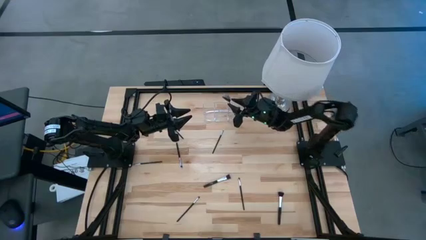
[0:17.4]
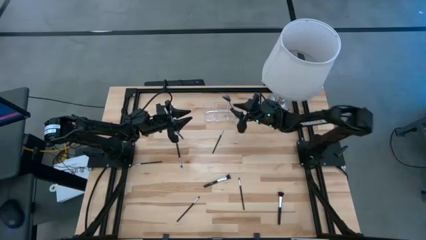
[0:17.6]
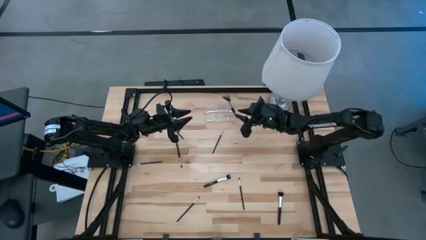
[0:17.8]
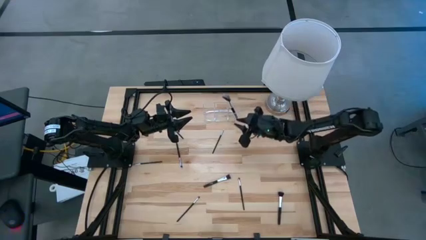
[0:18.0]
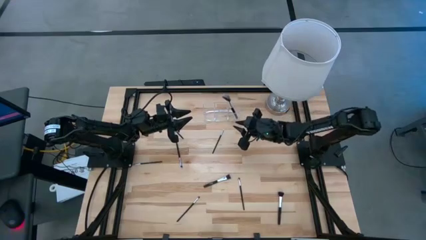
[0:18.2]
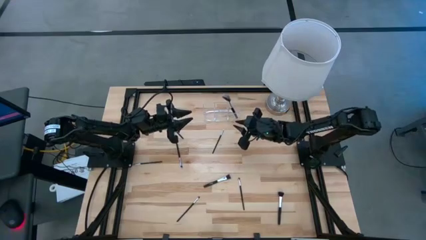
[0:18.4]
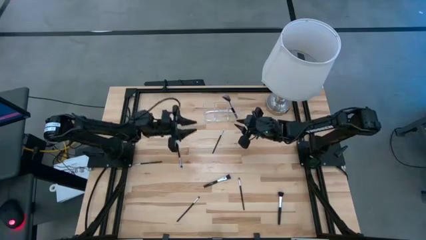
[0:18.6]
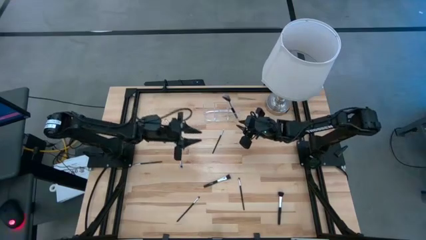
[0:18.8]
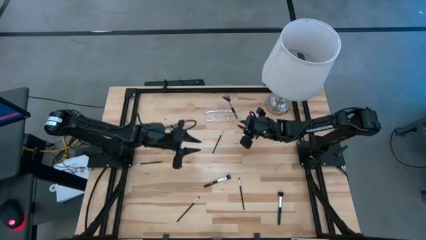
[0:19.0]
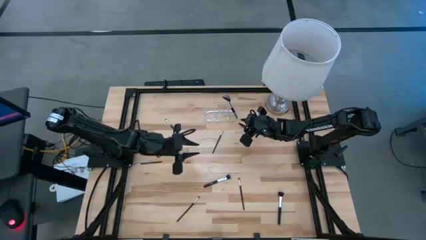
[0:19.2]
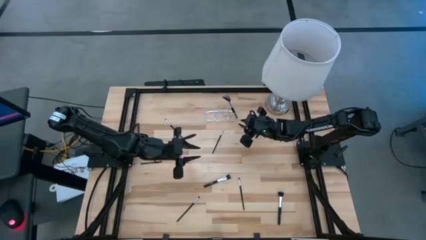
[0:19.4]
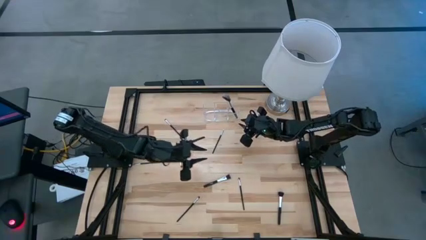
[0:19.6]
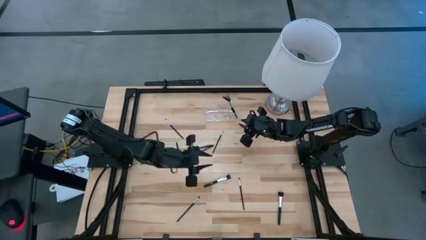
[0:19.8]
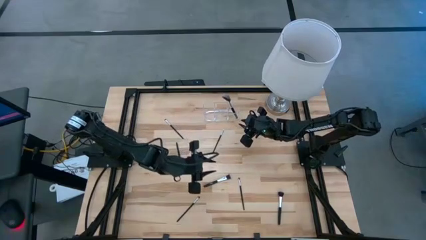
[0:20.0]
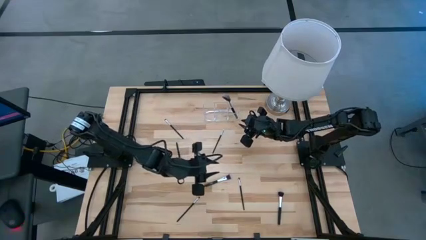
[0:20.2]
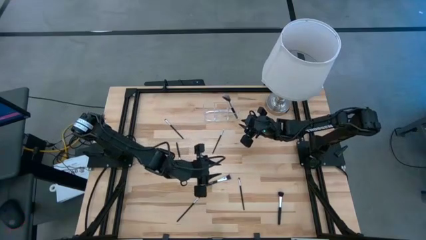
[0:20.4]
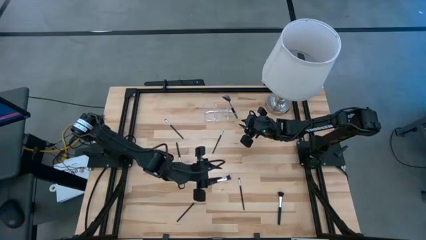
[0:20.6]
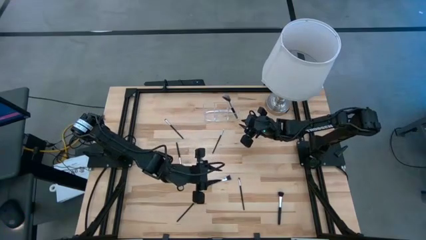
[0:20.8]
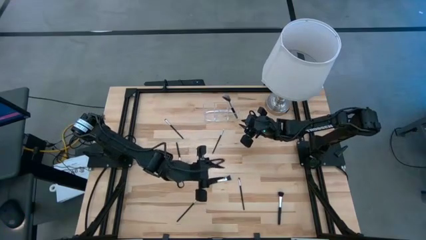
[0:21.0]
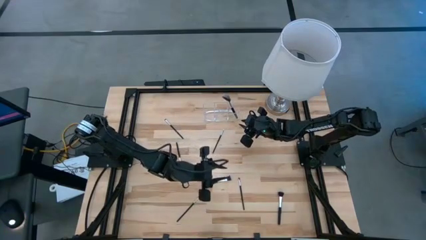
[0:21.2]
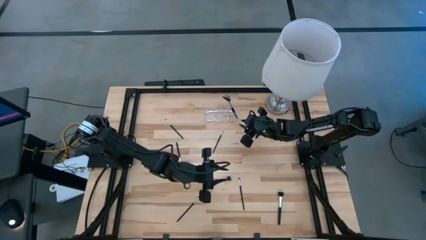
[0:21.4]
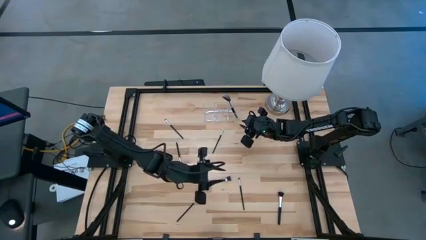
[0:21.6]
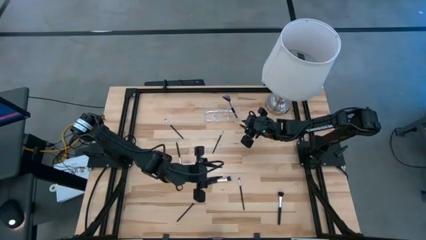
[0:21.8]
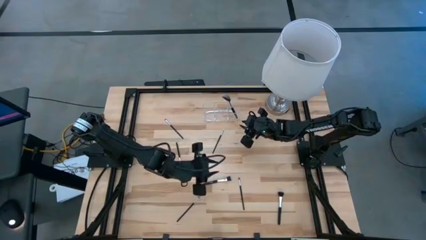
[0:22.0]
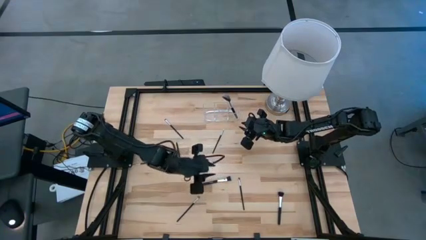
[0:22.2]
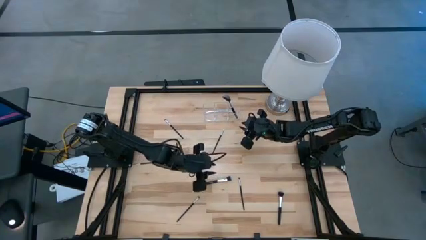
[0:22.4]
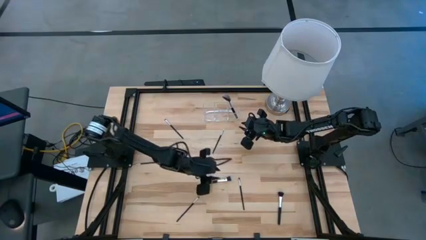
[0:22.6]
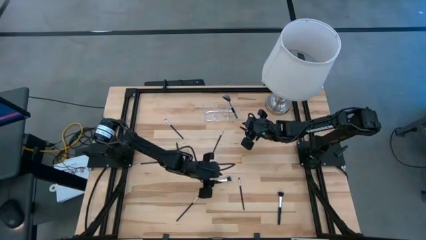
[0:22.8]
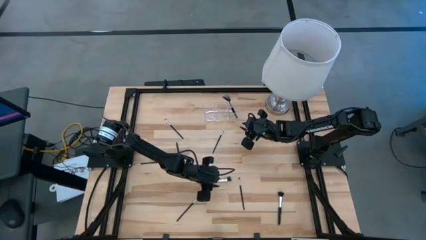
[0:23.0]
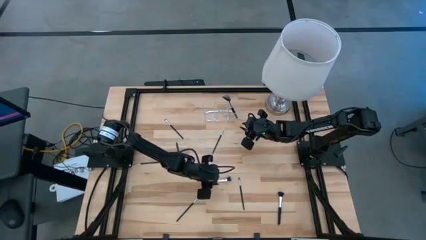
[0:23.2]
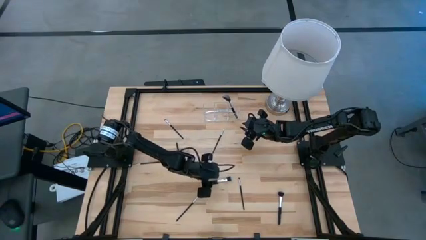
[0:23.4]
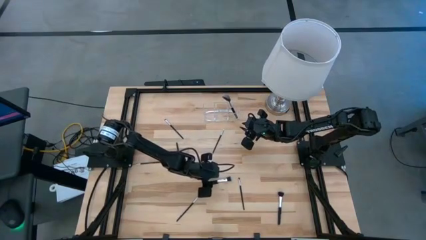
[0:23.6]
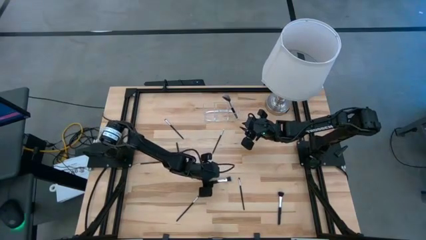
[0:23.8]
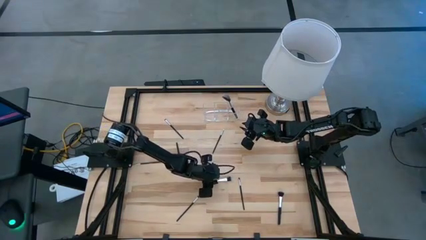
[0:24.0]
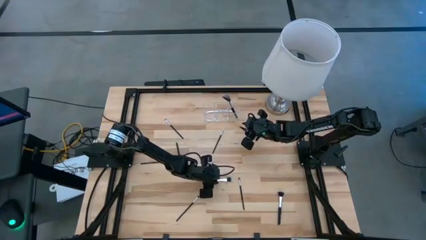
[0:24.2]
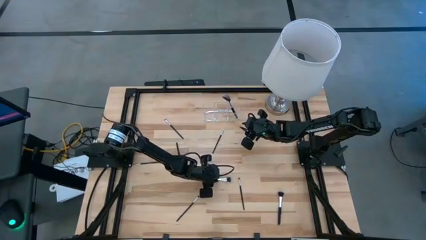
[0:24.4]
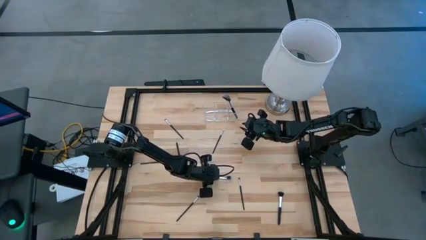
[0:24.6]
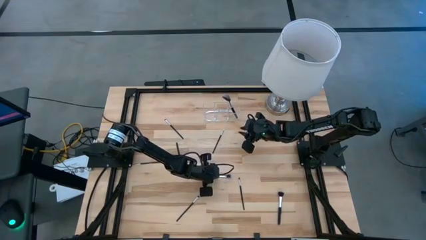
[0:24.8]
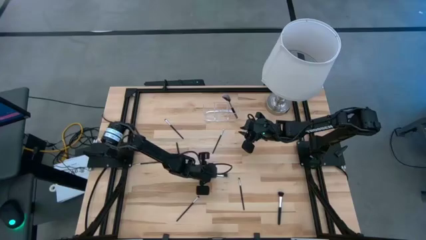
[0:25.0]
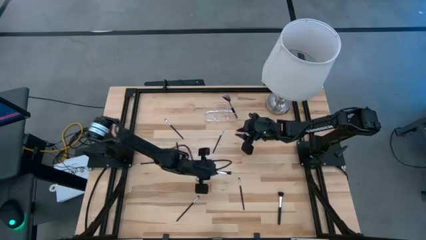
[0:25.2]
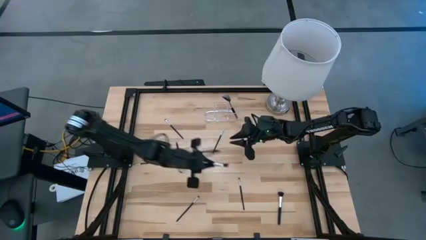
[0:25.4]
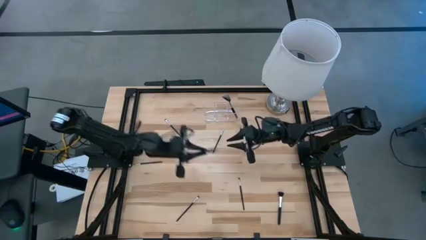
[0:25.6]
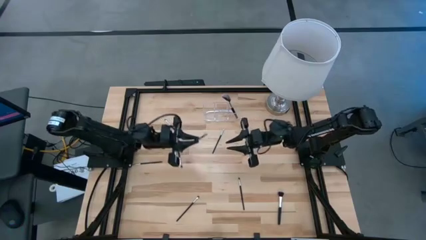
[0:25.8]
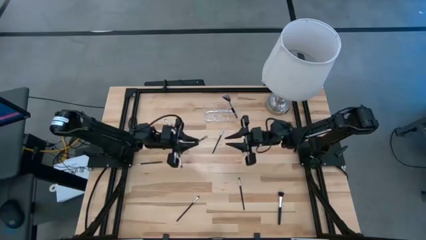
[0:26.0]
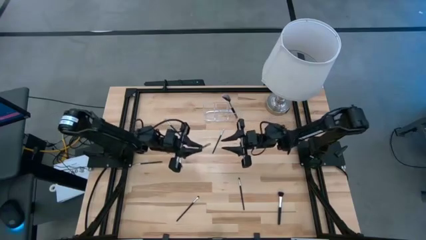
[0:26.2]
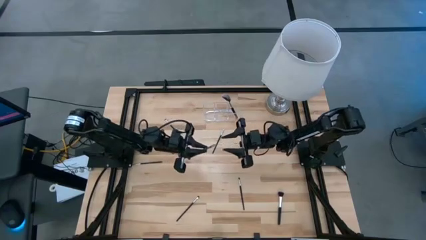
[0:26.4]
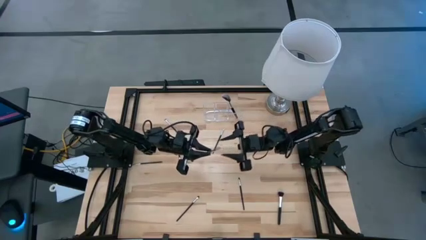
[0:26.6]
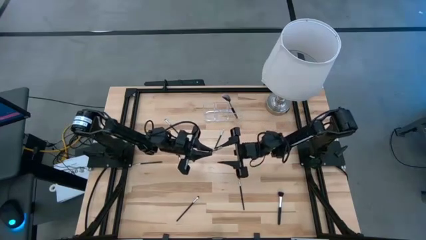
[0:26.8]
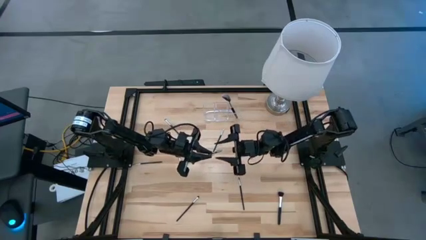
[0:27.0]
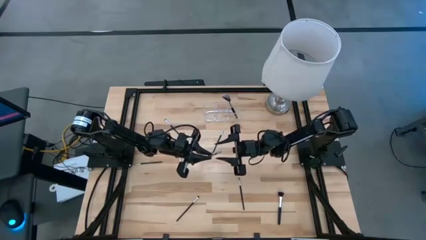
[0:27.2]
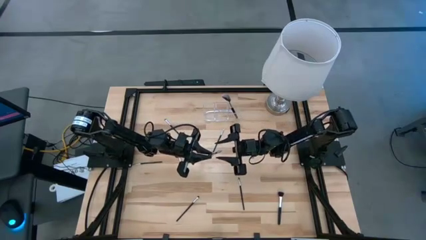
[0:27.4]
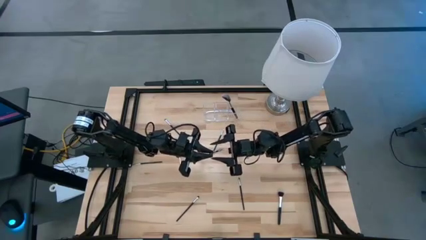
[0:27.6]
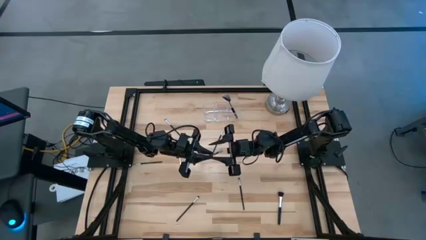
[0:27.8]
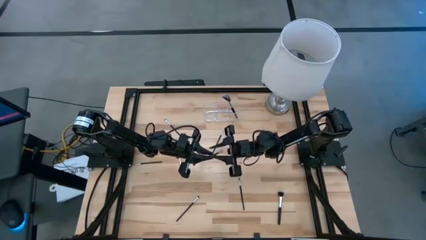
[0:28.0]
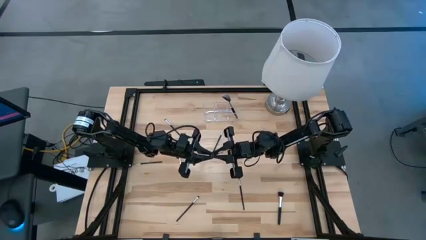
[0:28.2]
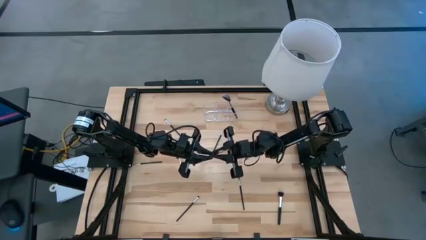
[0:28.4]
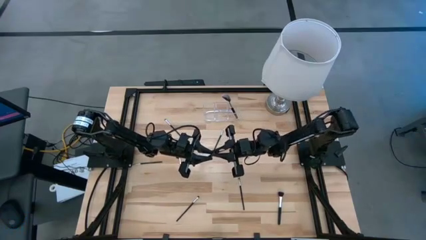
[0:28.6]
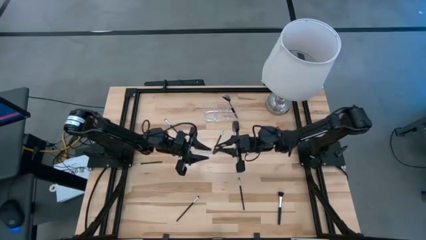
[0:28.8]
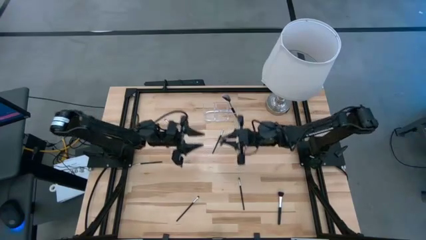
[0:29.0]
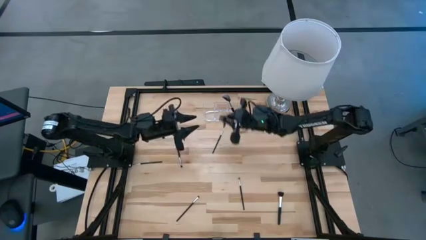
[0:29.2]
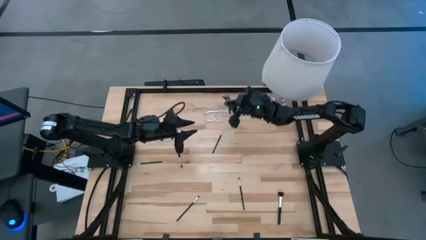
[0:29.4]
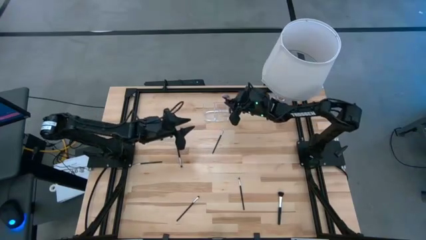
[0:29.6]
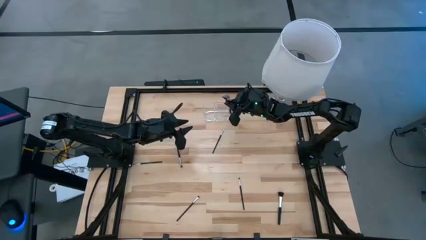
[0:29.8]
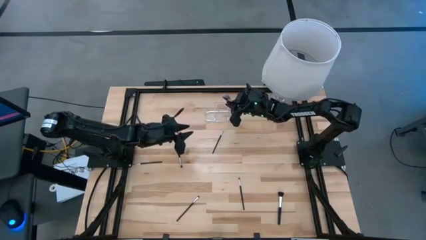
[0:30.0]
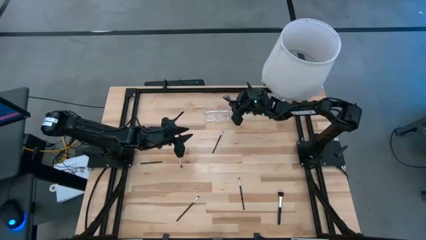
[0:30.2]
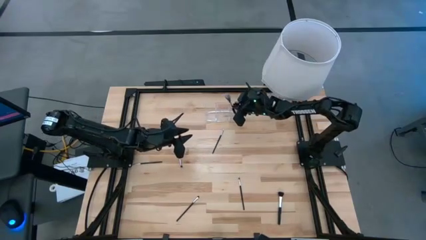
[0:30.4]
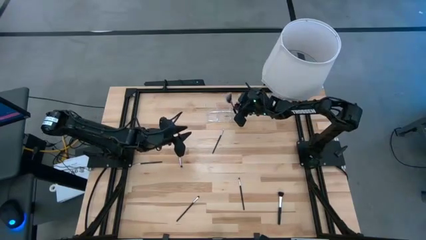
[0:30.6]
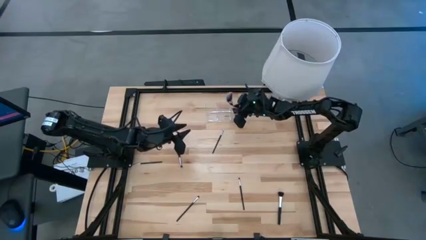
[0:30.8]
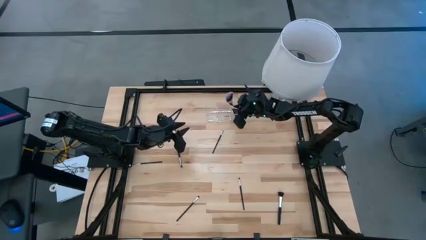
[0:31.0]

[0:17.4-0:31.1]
Task: Put items in baskets/containers
Put the silver blush brush into the transparent organizer

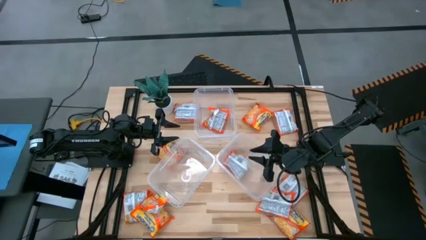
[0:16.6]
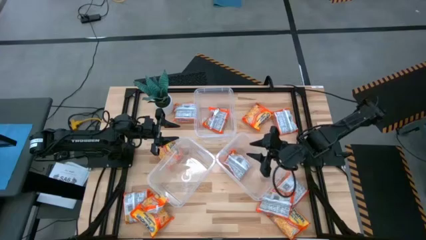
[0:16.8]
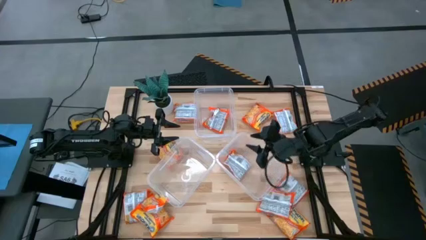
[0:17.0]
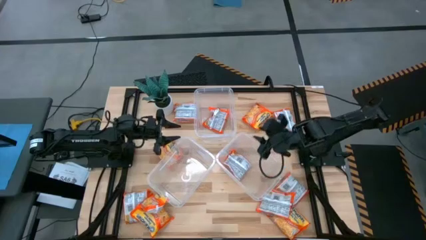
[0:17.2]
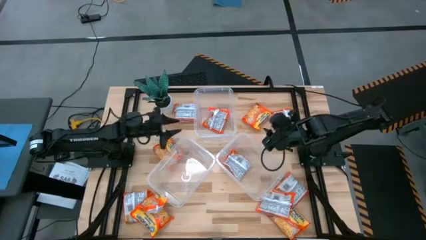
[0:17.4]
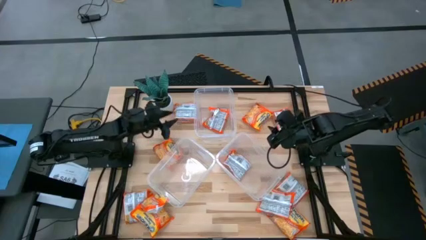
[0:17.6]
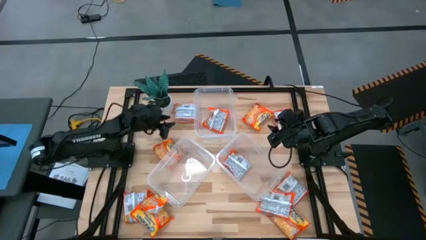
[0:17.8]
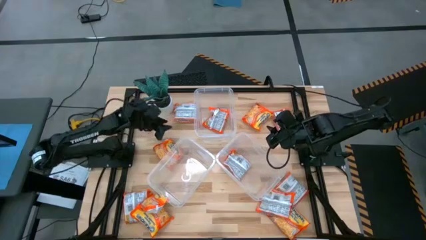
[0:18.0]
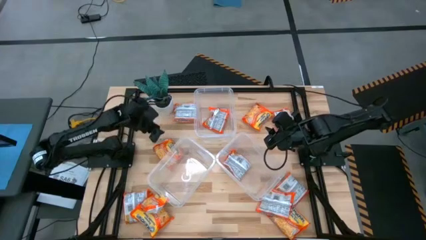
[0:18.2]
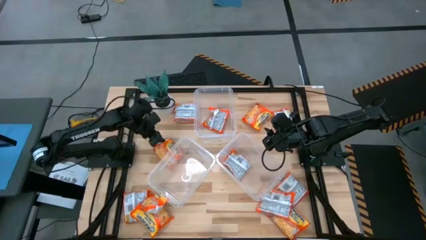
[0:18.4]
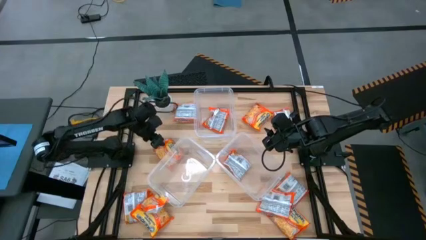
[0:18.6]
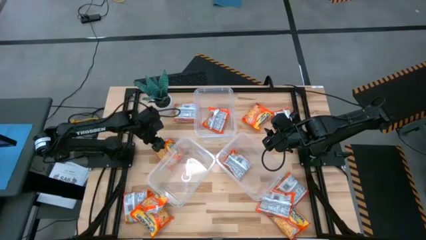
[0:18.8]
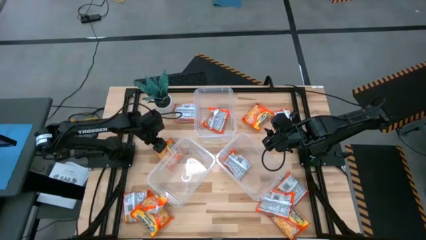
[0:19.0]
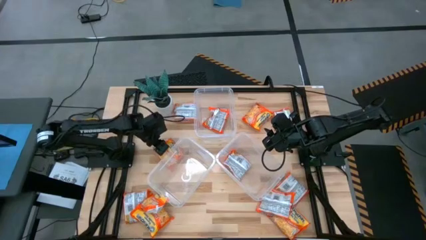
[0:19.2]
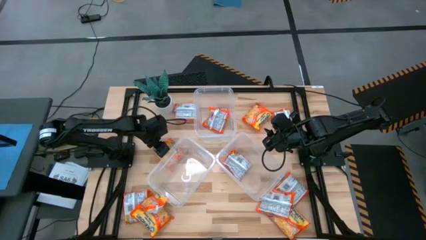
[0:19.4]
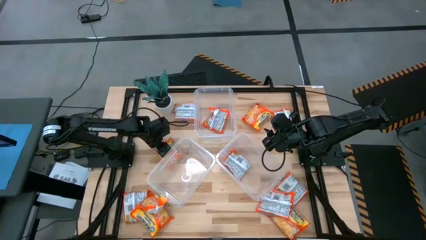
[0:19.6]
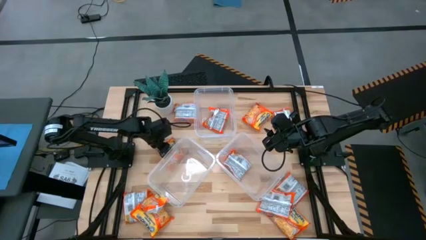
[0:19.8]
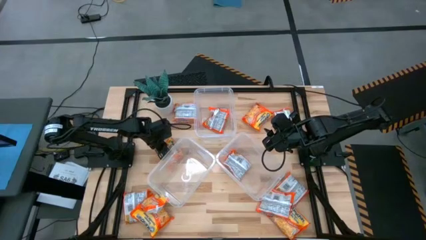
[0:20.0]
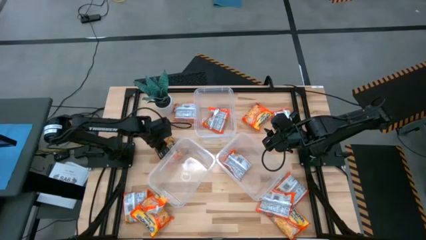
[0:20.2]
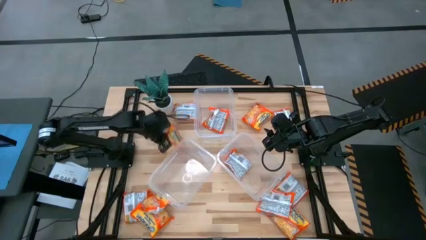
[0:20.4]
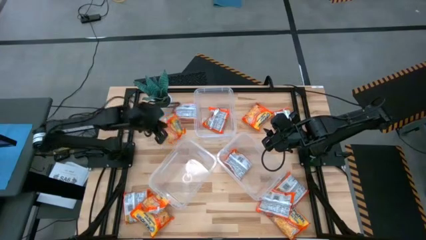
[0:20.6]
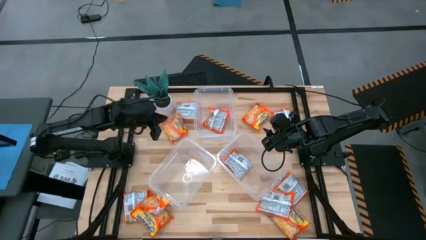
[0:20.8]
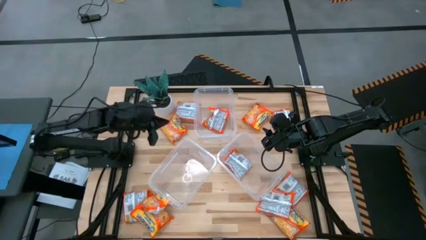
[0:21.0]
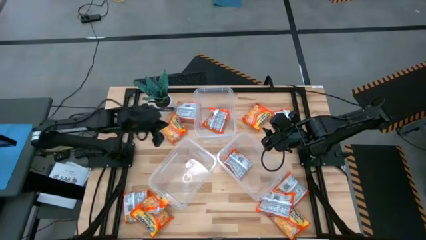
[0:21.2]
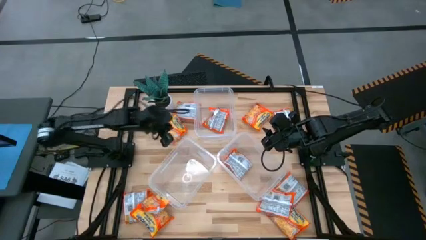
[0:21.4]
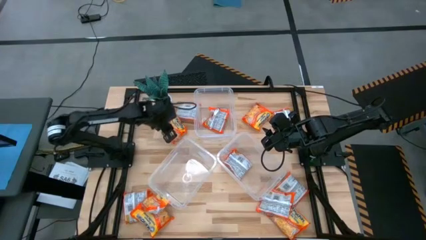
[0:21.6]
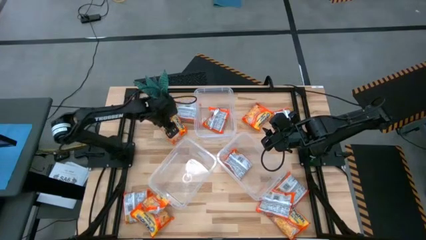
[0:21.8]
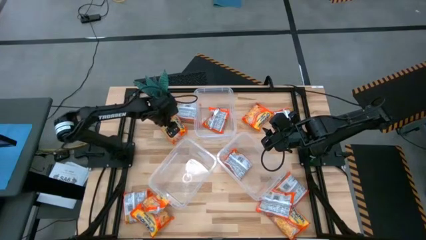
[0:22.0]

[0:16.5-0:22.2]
Task: Sort Maruchan noodles
Put the noodle pack into the bottom left transparent bin
